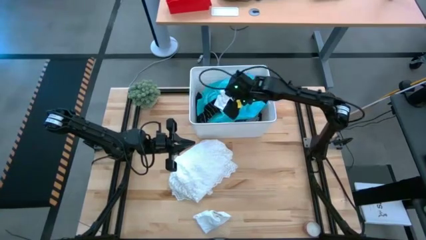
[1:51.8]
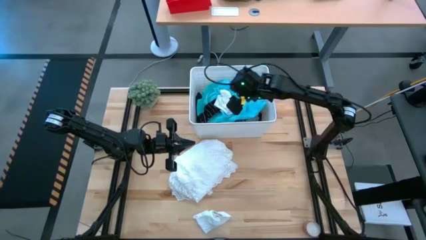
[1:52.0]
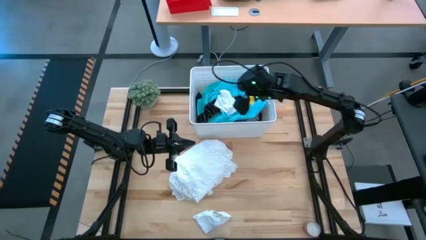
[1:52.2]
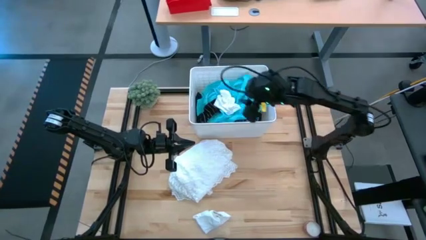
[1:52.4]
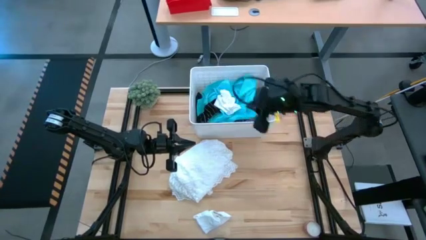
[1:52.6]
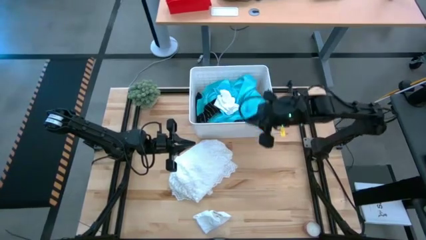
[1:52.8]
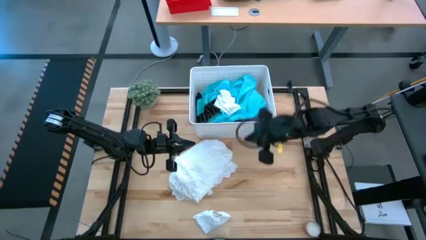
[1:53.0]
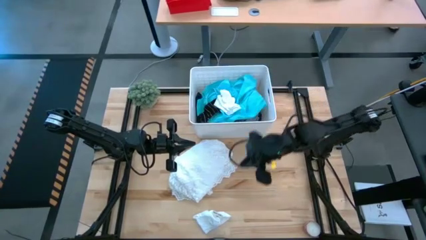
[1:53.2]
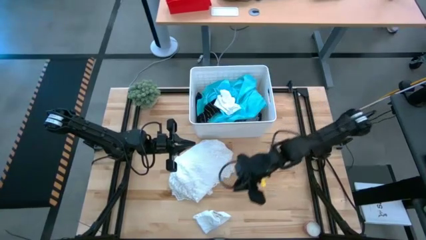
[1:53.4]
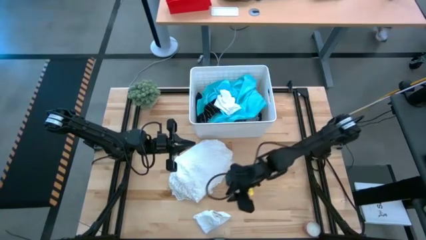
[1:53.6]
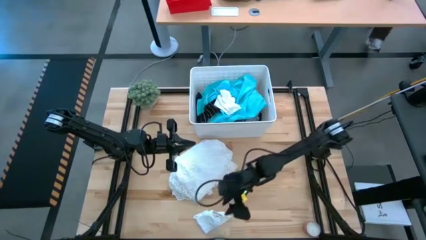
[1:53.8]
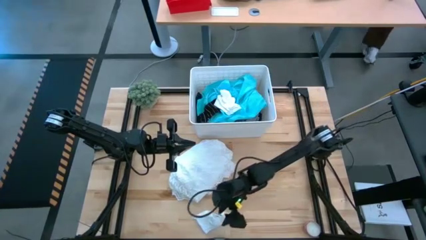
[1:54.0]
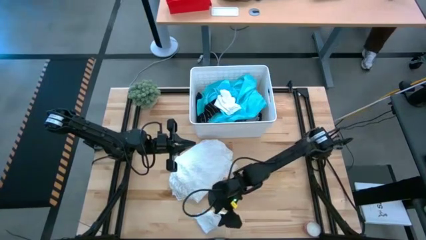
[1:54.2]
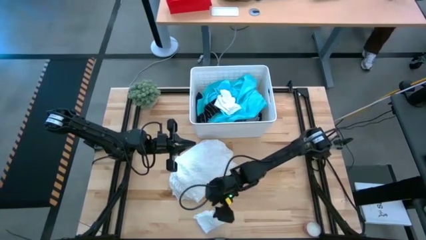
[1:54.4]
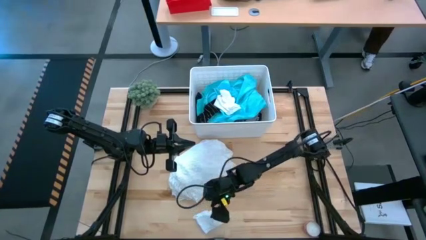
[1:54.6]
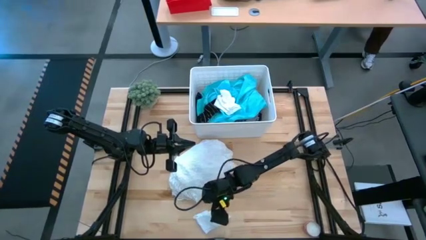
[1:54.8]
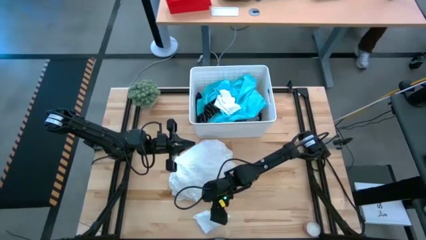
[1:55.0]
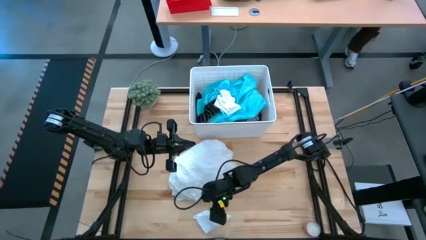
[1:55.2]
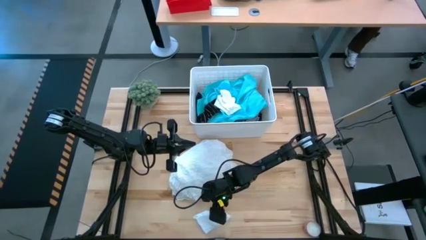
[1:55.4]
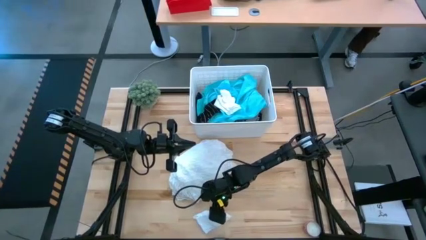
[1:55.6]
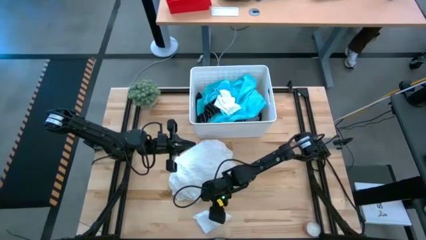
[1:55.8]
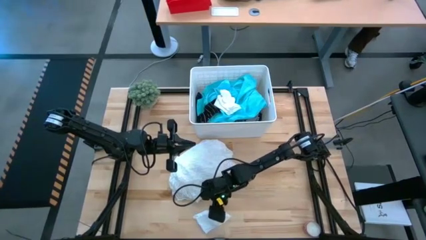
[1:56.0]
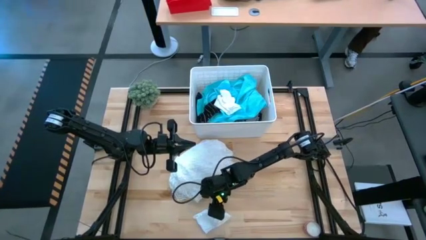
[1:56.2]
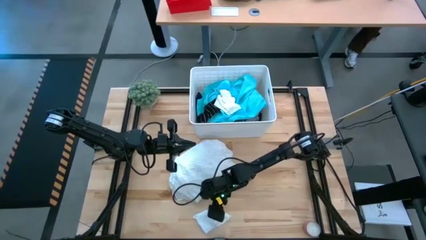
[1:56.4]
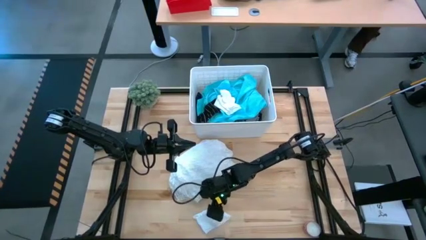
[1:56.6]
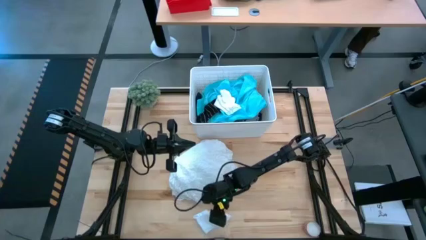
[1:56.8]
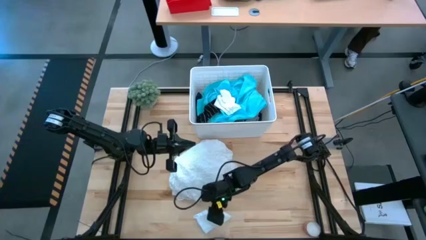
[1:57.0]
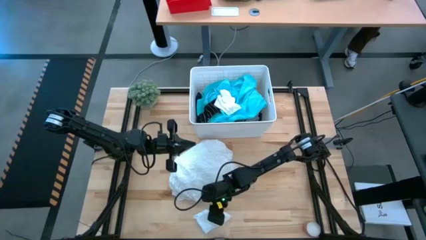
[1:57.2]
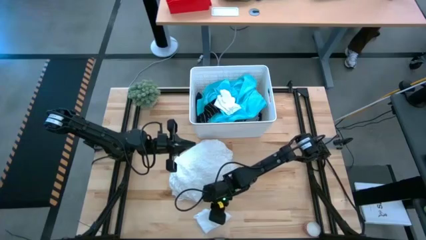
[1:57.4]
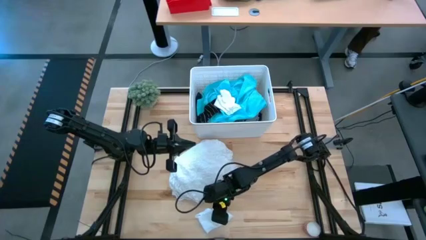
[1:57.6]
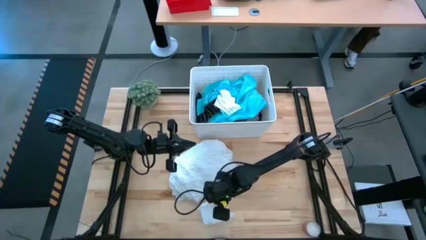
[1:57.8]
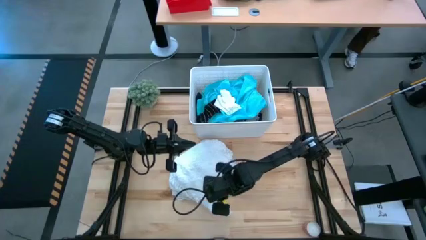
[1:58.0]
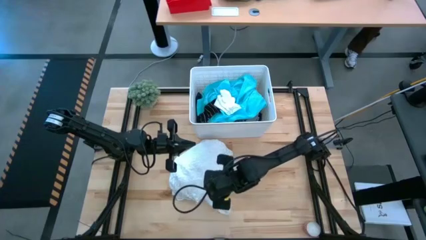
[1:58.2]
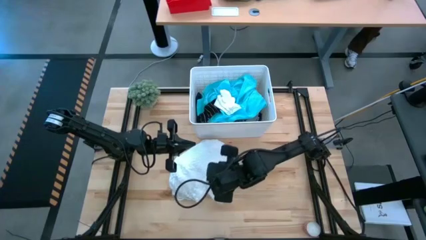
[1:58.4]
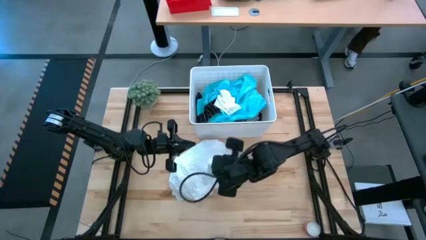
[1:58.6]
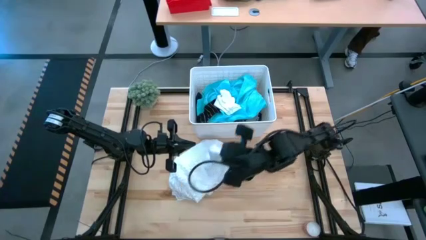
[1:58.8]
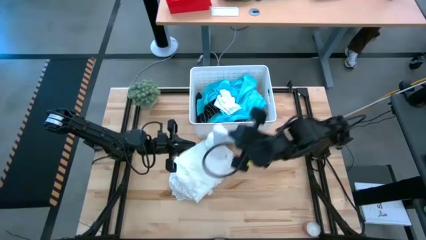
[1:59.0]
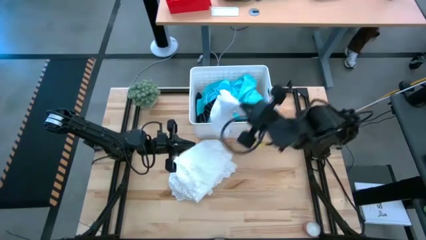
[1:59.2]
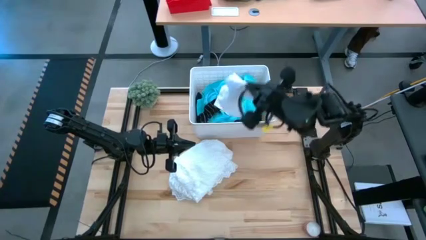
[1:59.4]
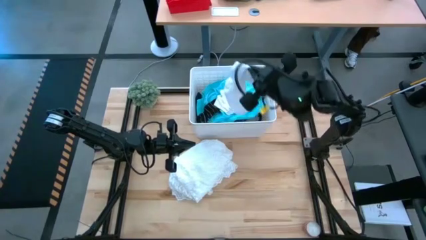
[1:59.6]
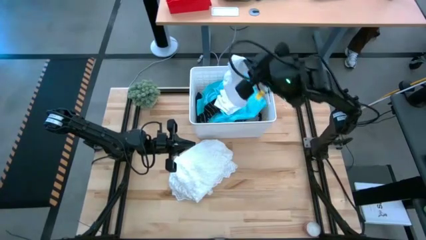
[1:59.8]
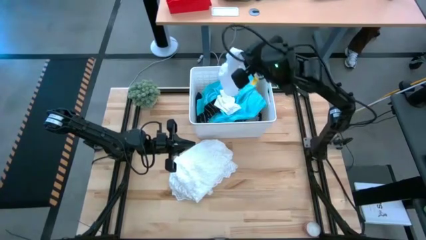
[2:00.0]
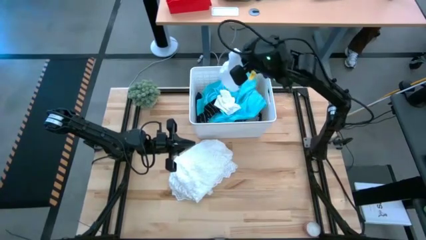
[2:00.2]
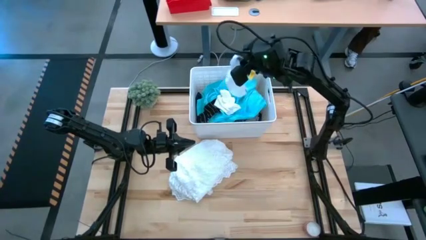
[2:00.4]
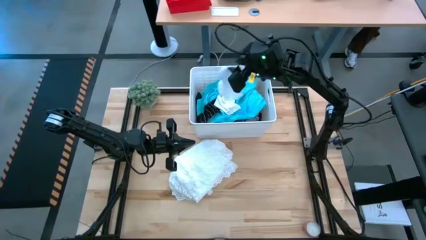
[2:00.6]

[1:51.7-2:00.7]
Task: Sort clothes
Put the white socks into the white bin

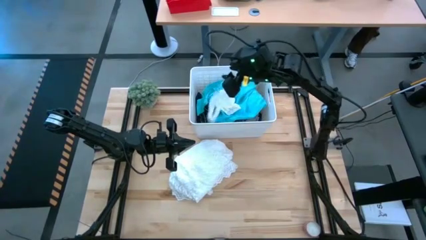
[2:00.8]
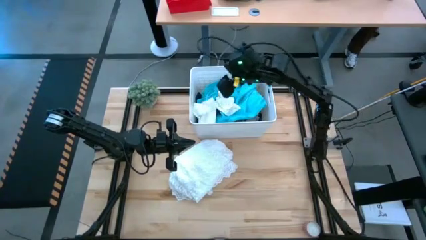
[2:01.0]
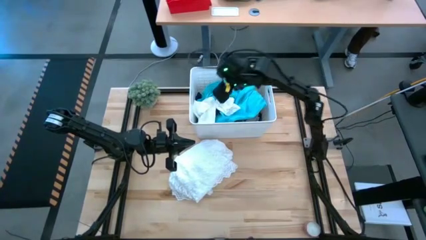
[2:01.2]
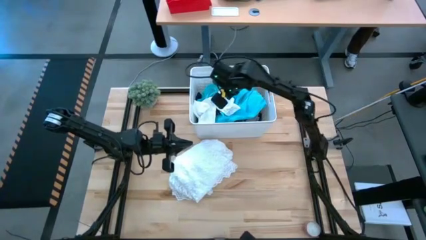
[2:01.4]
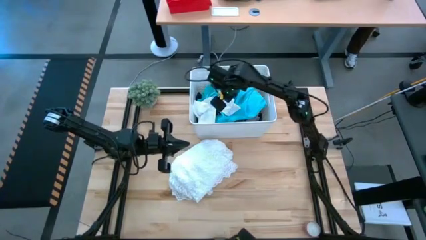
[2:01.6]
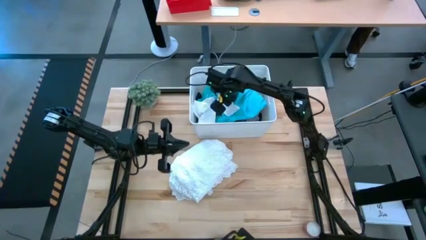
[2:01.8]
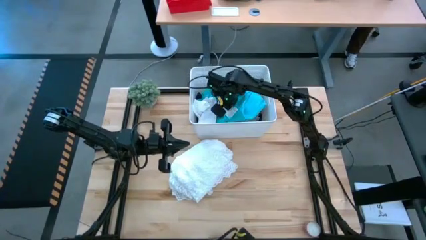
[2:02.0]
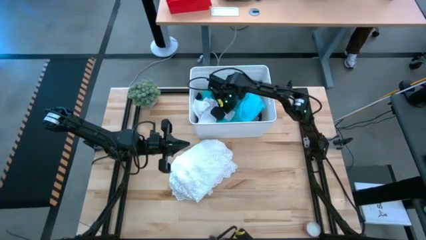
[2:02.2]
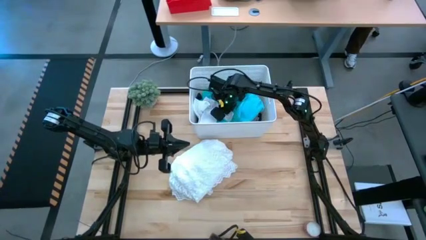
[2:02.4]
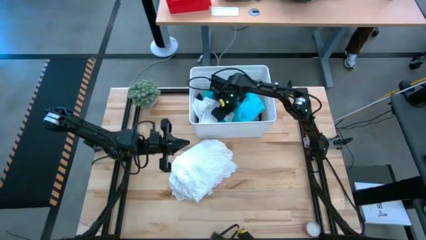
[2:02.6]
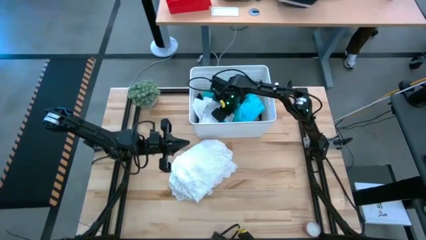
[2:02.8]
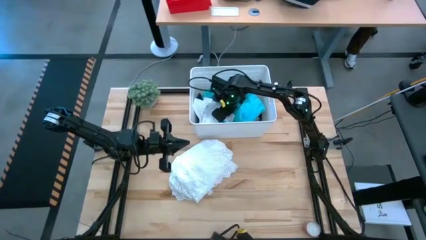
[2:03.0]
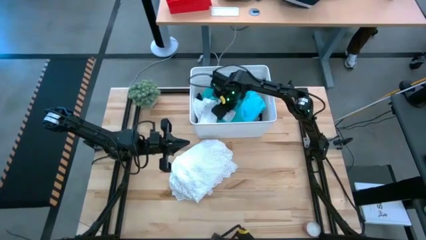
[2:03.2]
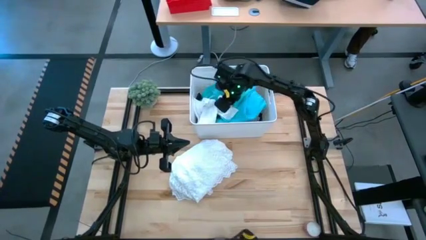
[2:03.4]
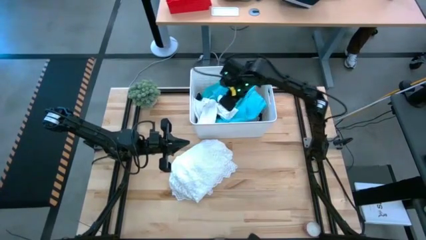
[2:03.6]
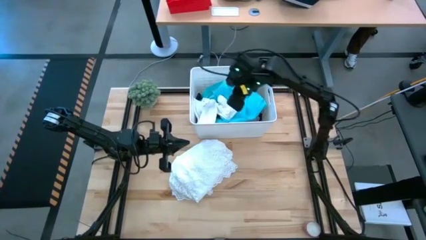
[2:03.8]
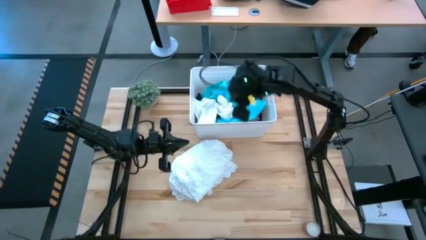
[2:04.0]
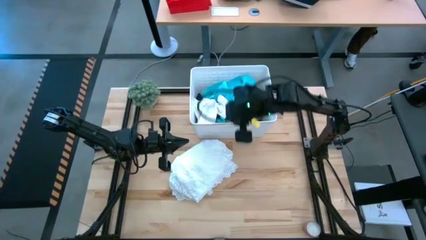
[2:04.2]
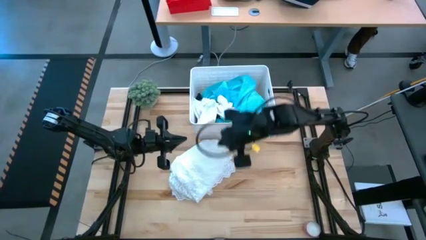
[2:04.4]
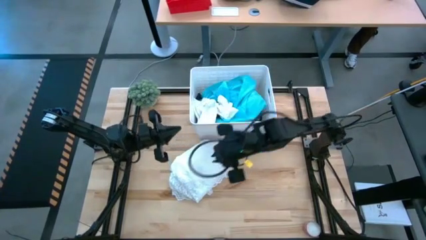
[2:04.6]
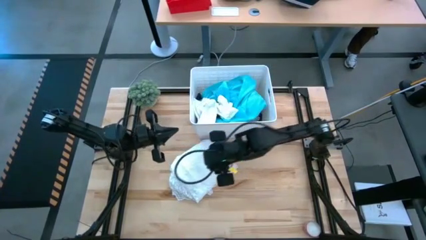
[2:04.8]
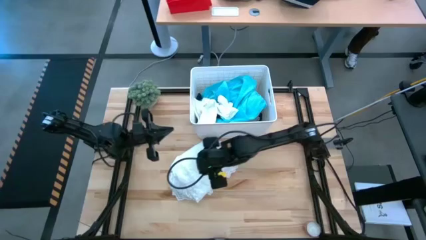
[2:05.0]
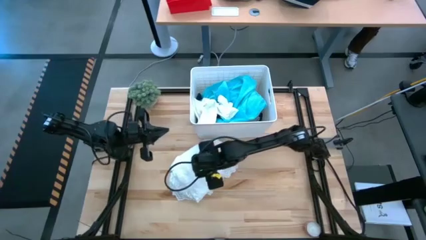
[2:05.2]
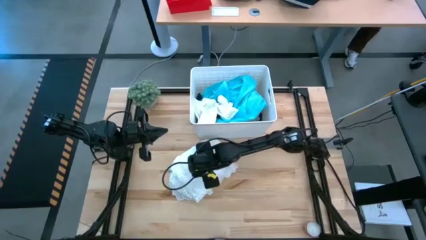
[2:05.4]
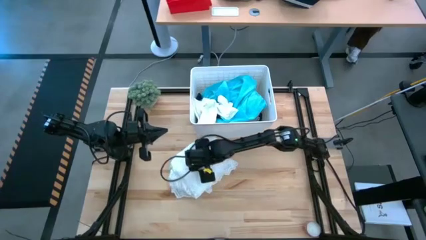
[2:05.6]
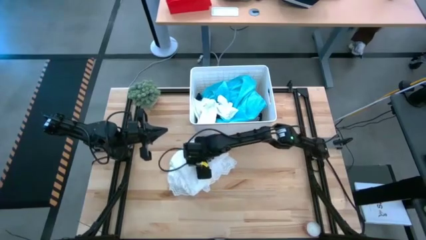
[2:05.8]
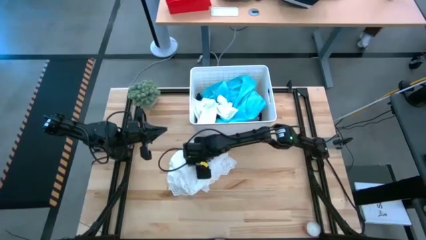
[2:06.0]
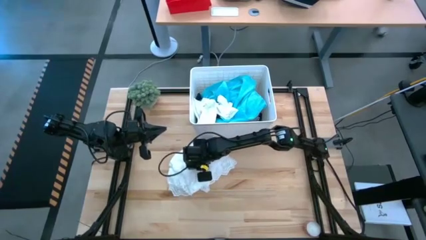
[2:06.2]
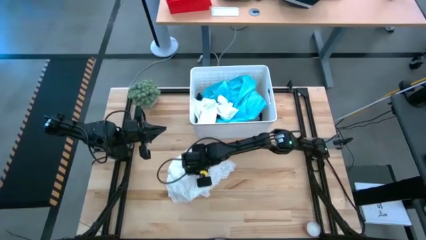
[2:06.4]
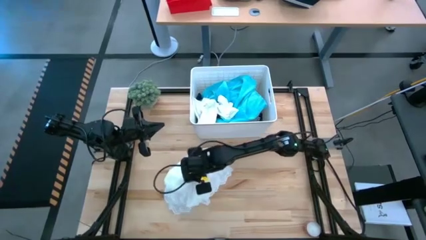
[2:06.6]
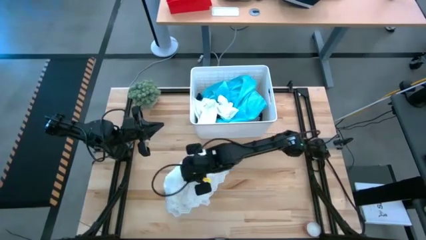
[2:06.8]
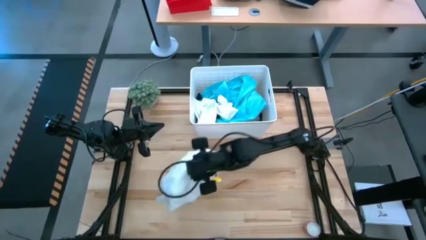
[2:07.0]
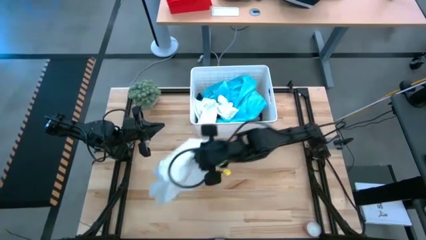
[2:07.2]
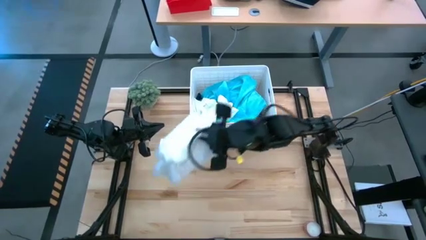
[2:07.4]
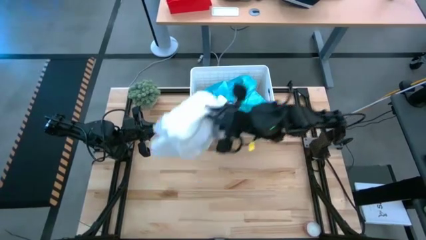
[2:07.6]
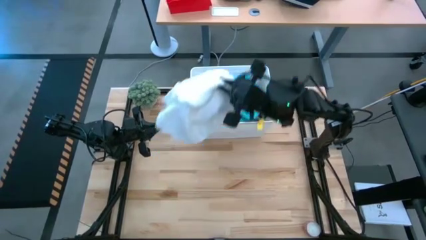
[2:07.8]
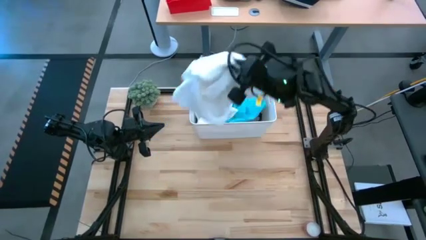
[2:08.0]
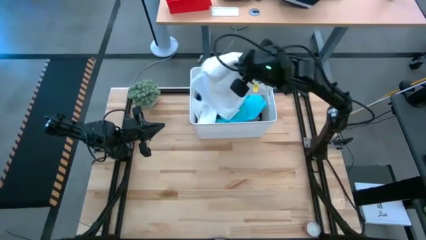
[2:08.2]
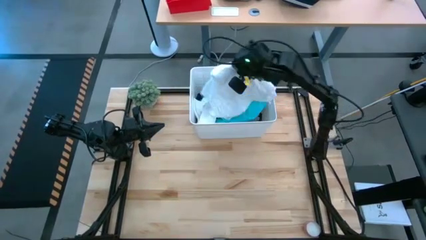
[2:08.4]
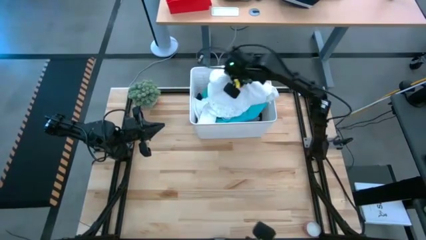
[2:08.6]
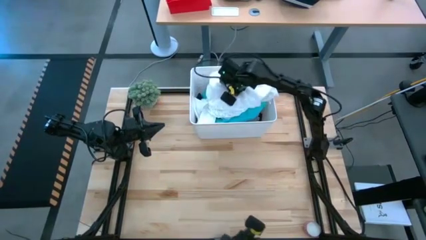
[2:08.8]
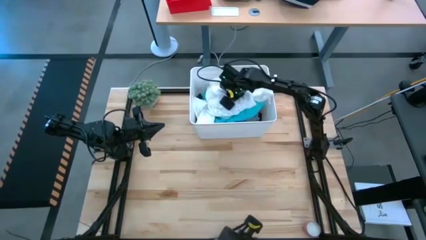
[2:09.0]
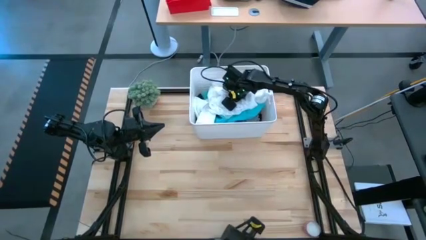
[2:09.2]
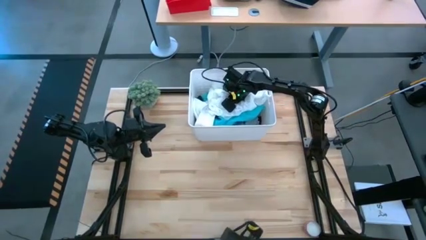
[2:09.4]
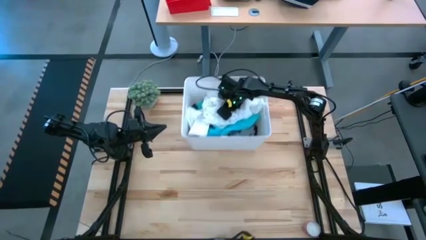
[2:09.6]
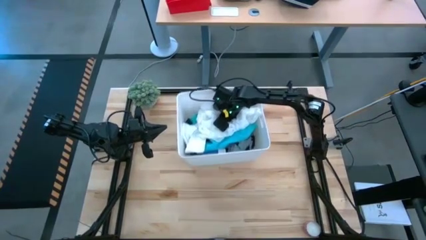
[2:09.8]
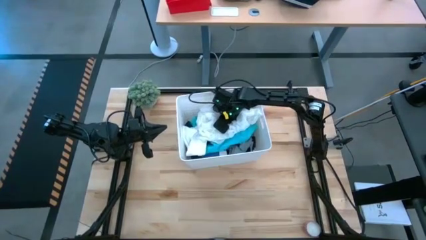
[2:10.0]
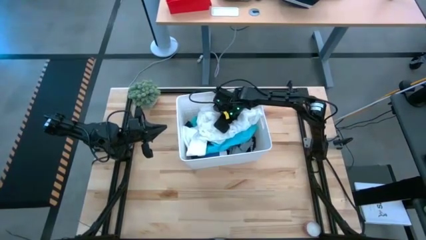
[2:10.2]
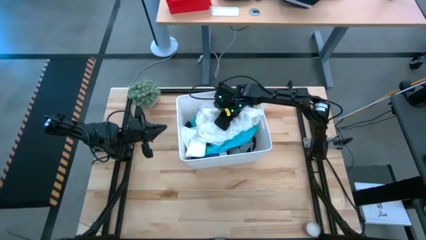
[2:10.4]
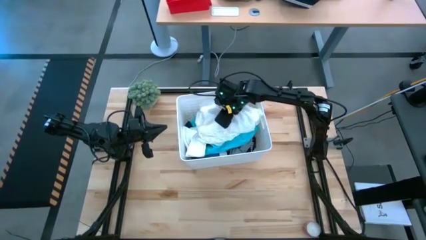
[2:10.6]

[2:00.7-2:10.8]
Put the white table mat into the white bin
